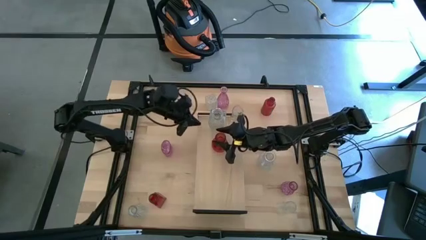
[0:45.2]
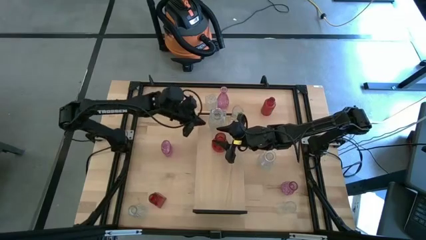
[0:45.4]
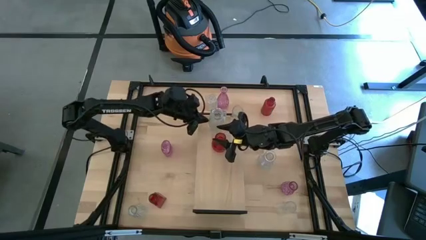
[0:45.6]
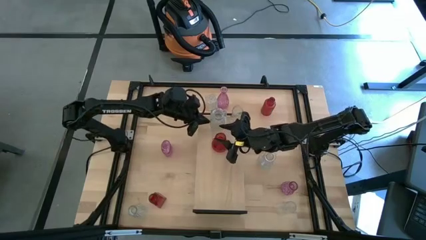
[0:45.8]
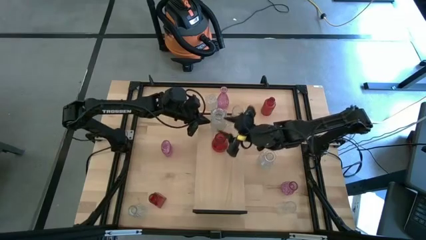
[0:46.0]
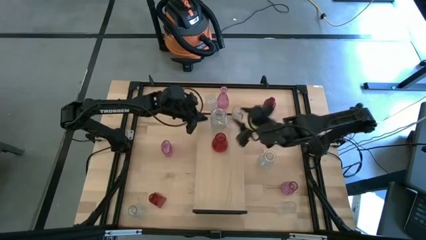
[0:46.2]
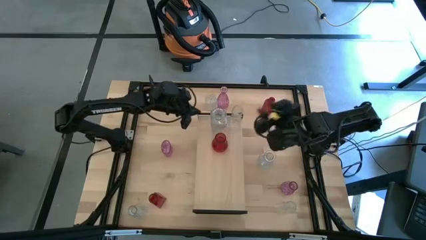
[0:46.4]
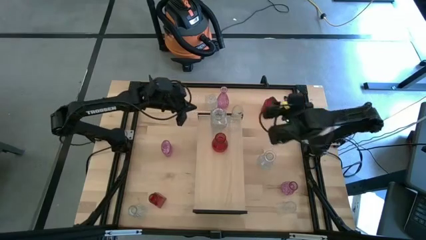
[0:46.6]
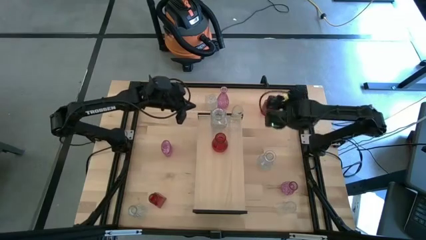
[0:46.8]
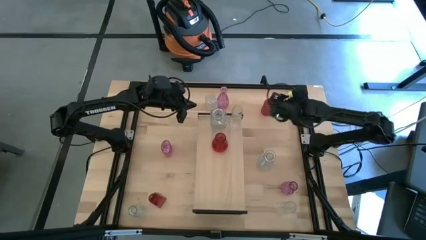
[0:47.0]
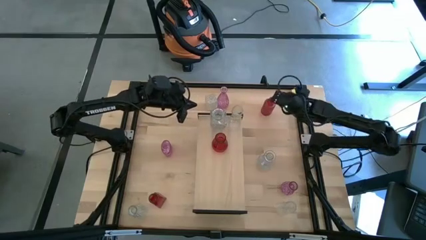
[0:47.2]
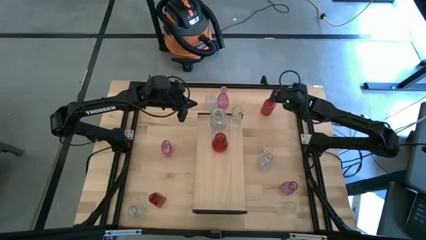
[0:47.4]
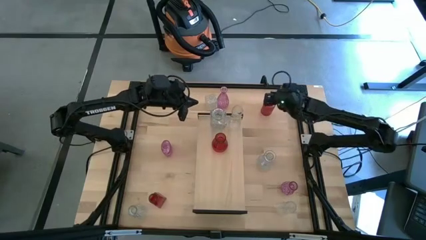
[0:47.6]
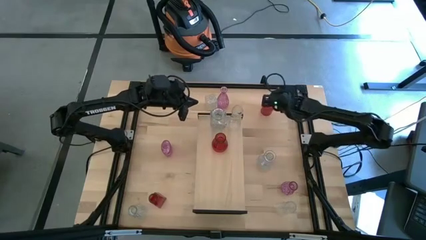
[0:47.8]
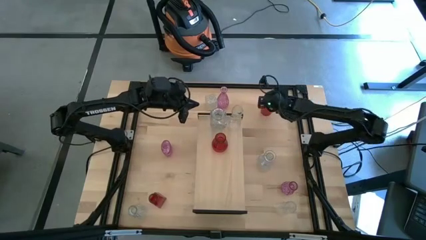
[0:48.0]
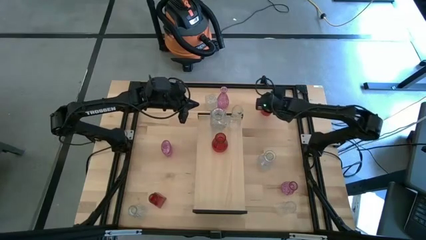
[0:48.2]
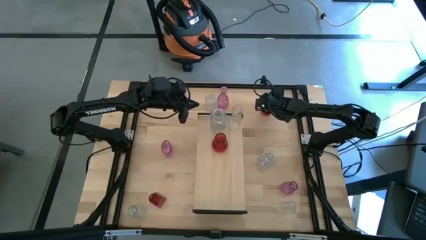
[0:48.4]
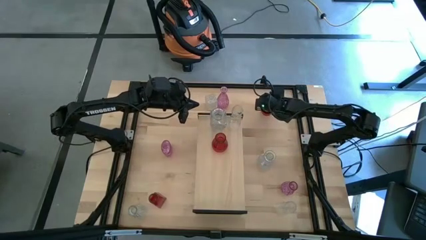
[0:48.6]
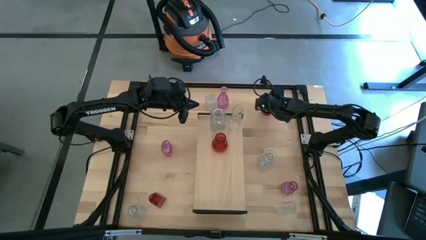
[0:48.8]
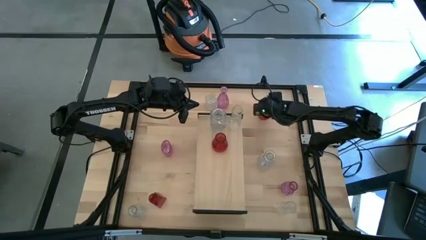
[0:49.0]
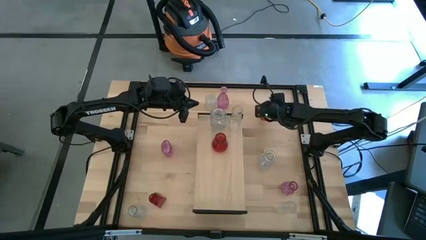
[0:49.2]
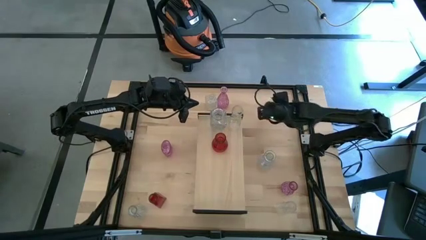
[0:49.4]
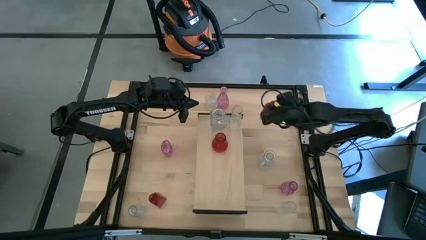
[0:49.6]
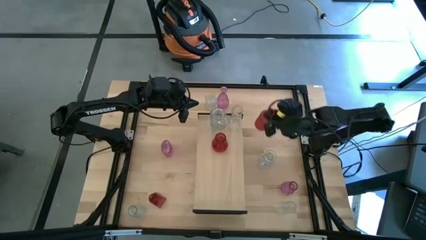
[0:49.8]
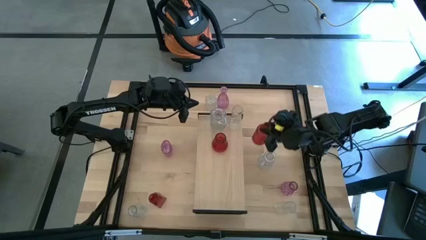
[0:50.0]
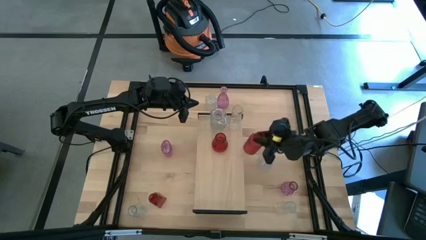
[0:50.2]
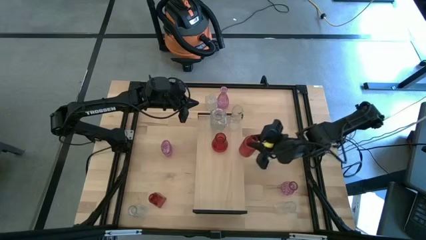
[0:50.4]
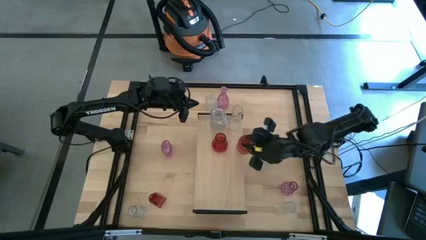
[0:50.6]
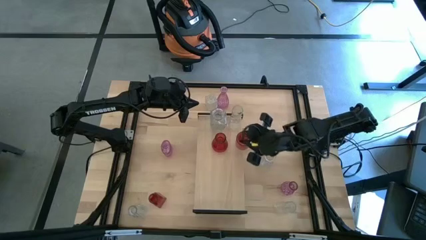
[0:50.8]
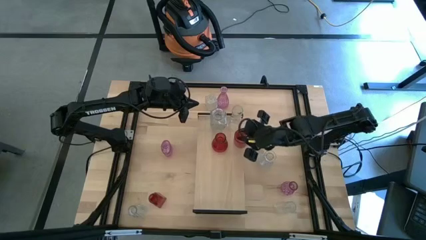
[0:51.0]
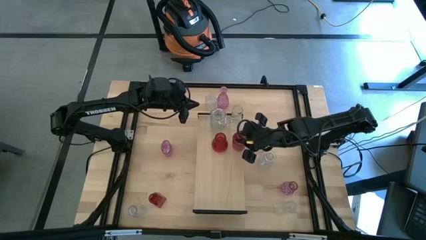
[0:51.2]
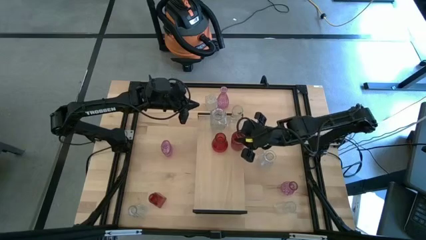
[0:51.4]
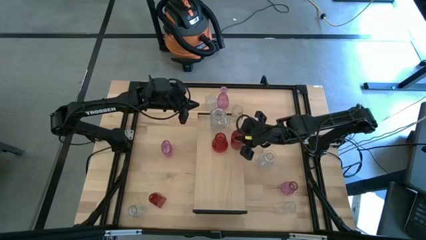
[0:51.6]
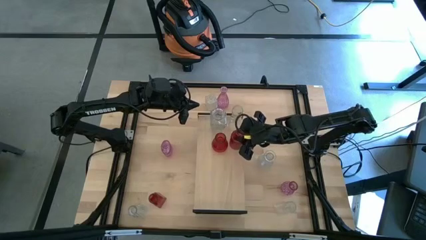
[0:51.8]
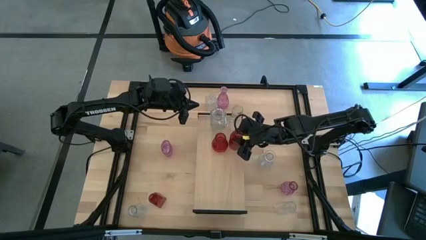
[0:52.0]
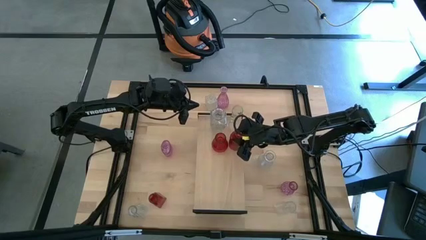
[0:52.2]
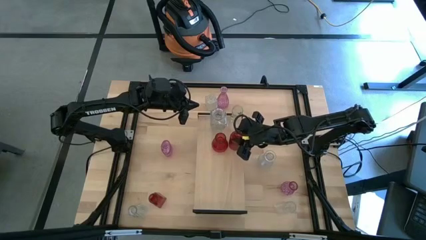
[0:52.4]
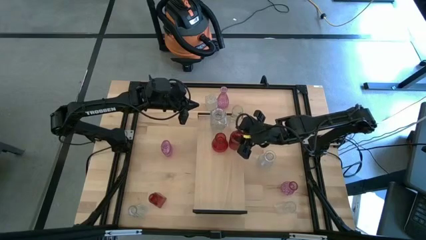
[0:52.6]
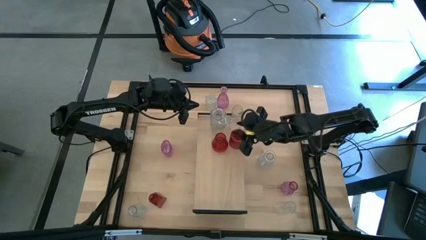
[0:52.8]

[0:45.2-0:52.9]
Task: sort vases onto shelf
Put the red vase on the shelf aligned with the red vase

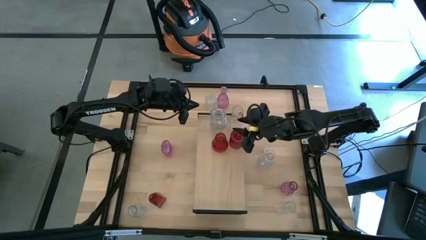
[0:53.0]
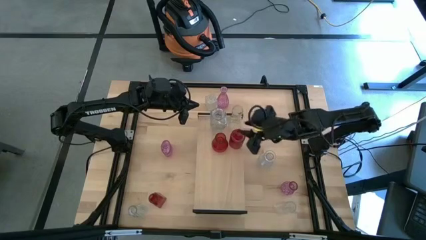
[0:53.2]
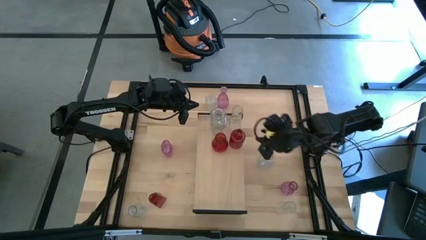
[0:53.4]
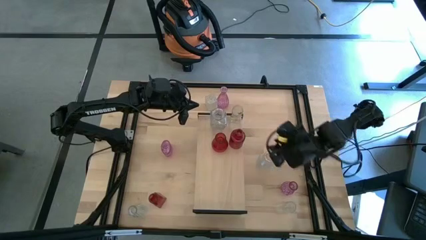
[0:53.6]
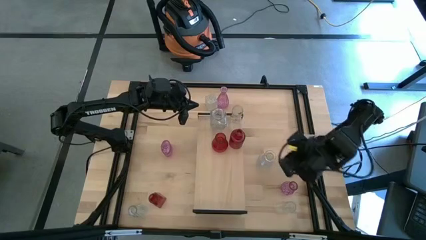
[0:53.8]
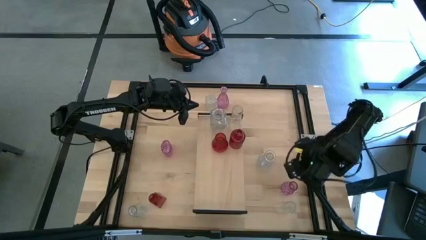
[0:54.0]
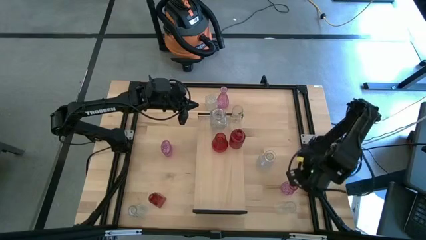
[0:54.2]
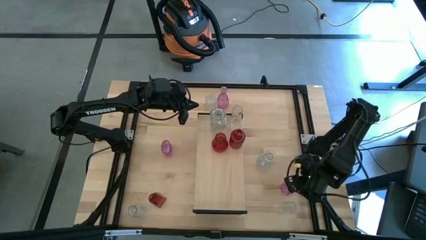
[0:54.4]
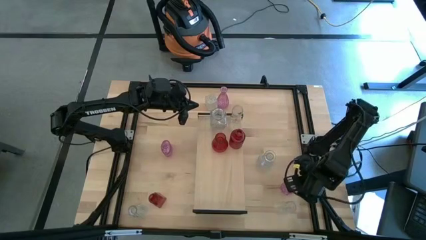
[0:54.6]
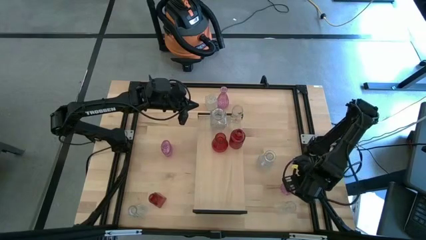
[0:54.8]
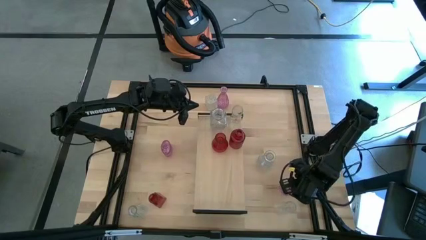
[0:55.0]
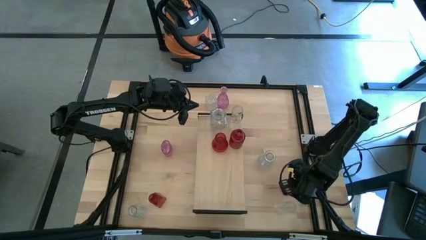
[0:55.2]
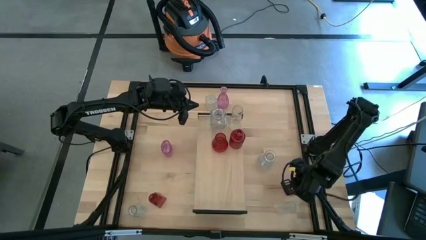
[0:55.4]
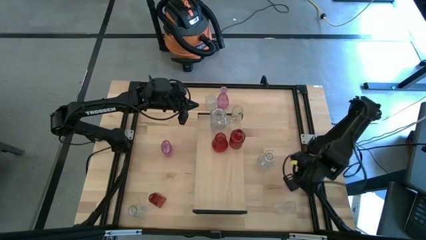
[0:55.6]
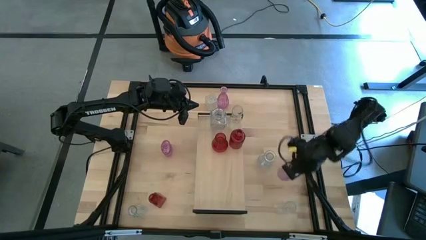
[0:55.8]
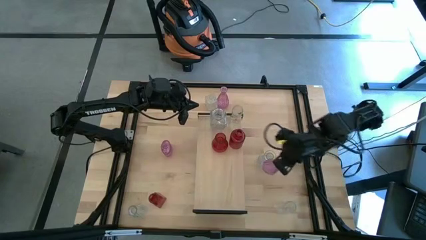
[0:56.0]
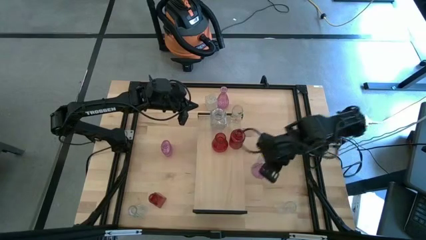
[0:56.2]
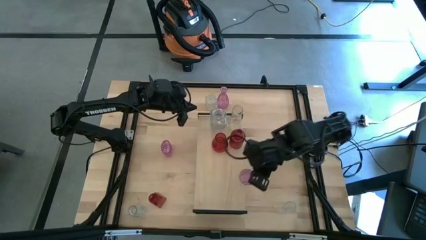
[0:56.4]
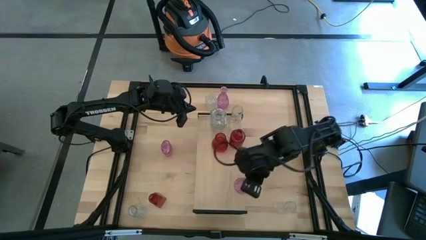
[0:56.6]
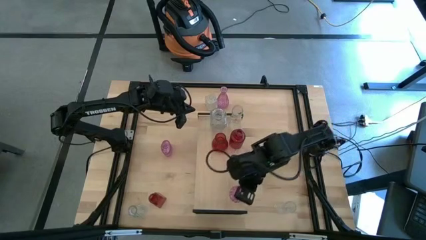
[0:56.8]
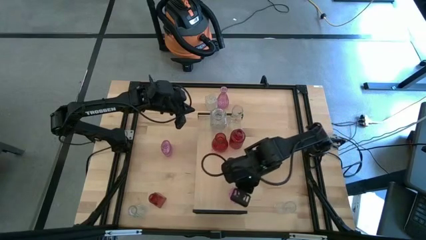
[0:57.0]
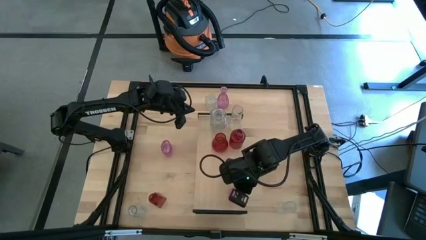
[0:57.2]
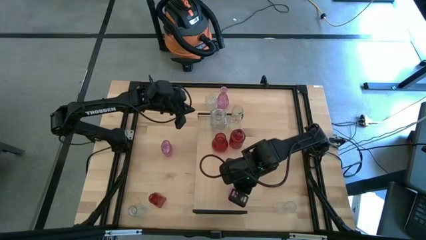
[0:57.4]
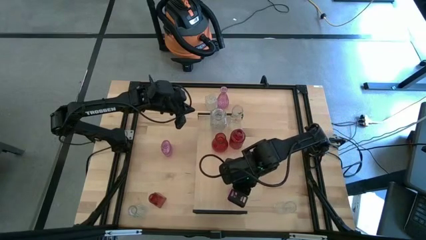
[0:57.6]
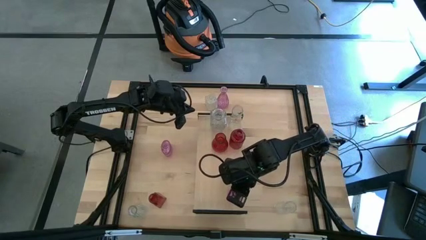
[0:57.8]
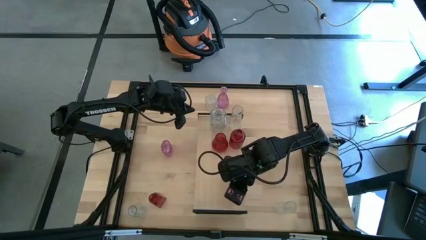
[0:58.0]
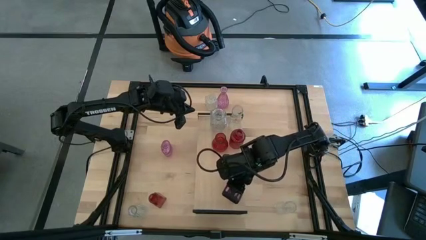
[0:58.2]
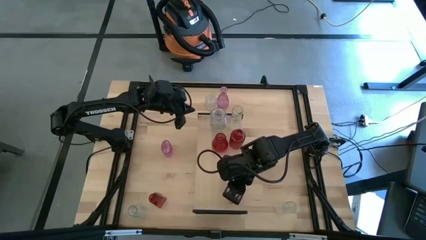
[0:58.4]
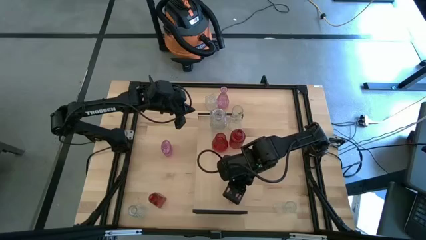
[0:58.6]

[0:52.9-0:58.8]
Put the violet vase on the shelf
